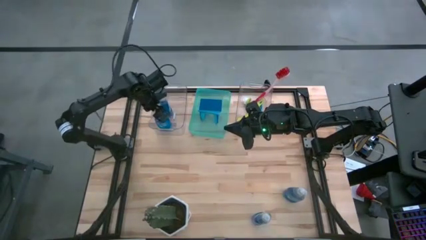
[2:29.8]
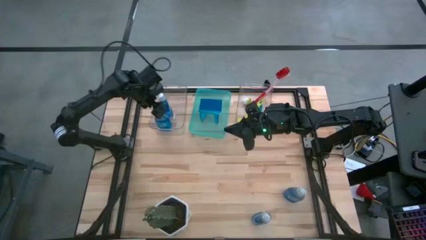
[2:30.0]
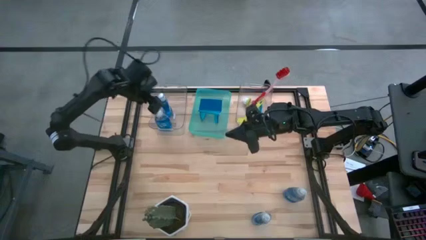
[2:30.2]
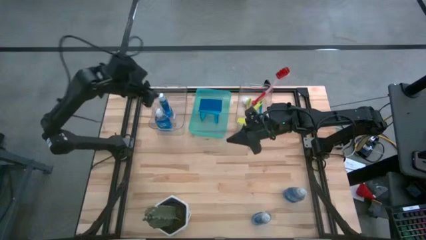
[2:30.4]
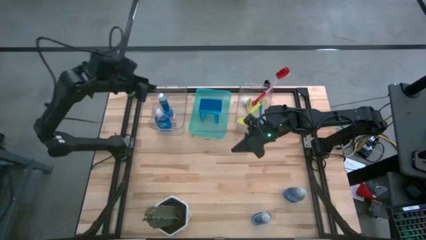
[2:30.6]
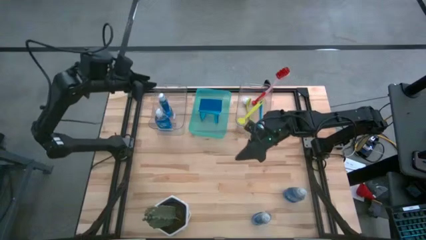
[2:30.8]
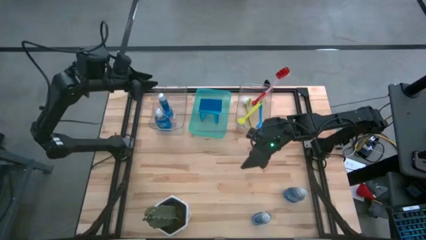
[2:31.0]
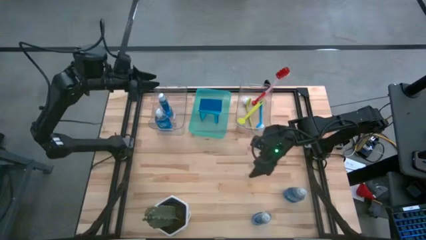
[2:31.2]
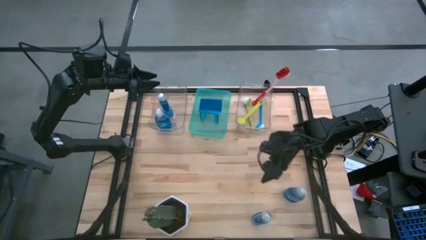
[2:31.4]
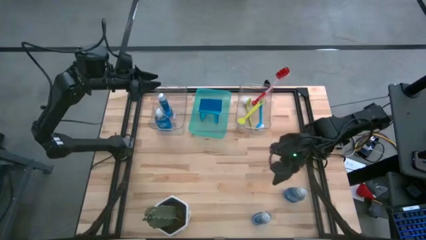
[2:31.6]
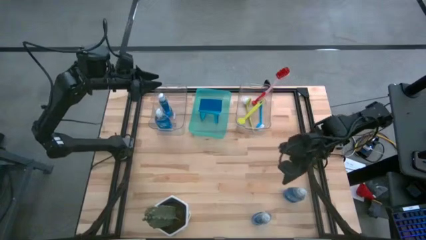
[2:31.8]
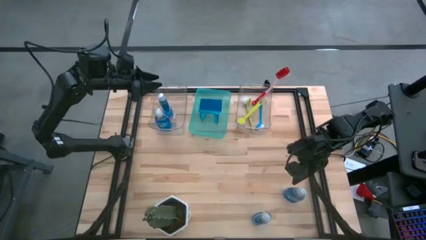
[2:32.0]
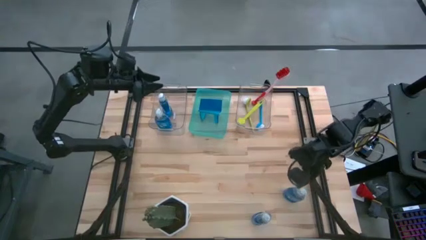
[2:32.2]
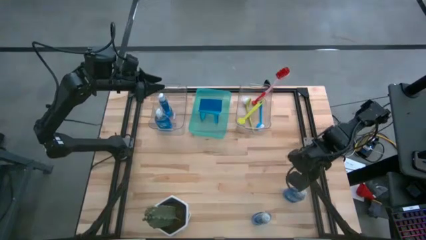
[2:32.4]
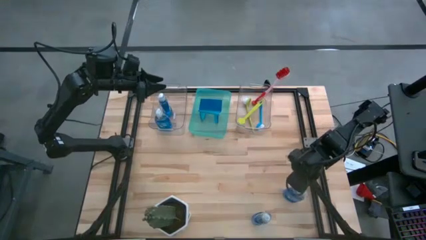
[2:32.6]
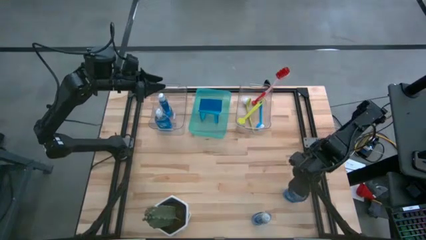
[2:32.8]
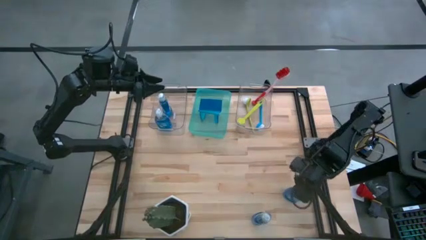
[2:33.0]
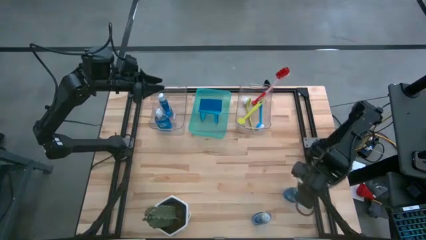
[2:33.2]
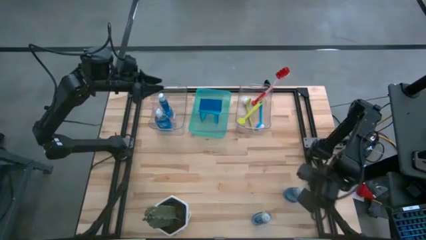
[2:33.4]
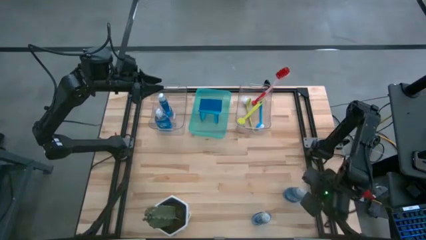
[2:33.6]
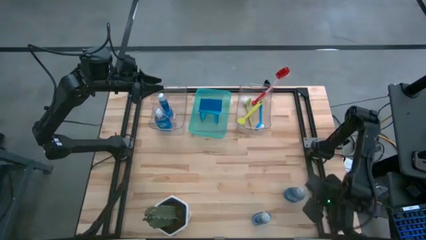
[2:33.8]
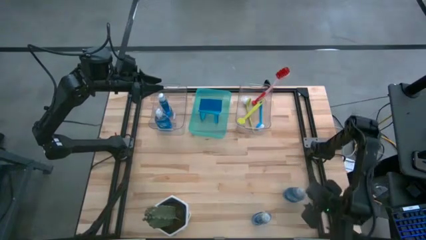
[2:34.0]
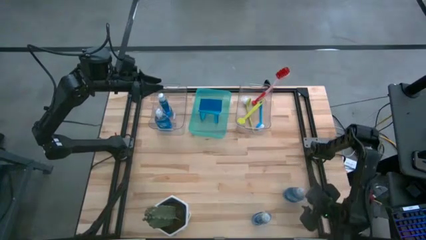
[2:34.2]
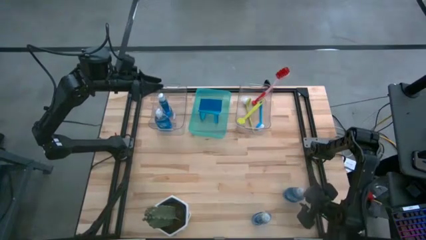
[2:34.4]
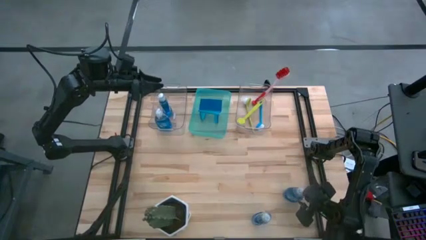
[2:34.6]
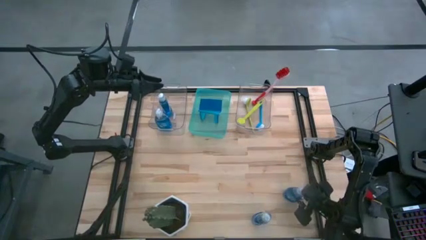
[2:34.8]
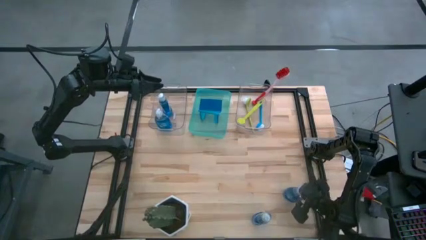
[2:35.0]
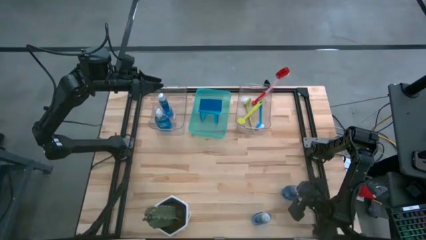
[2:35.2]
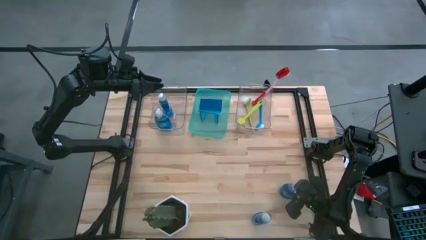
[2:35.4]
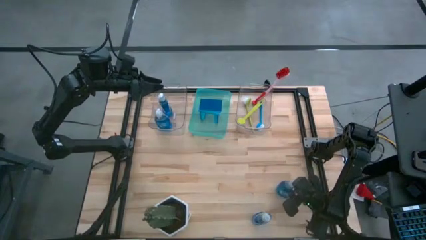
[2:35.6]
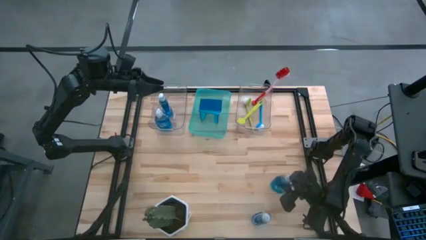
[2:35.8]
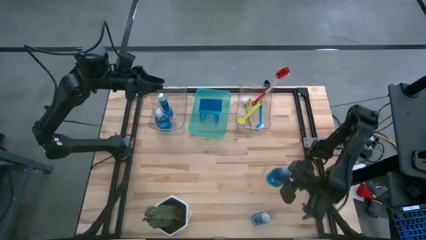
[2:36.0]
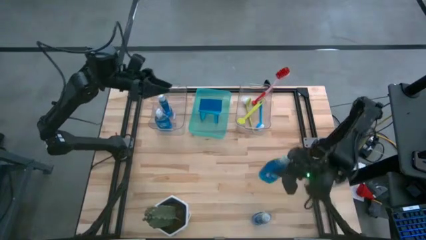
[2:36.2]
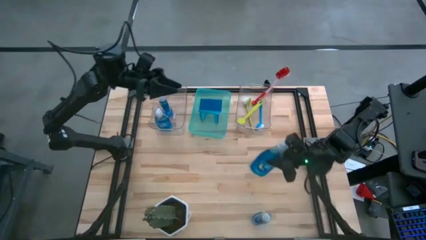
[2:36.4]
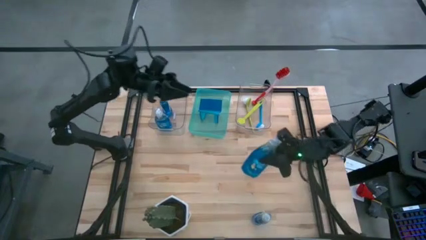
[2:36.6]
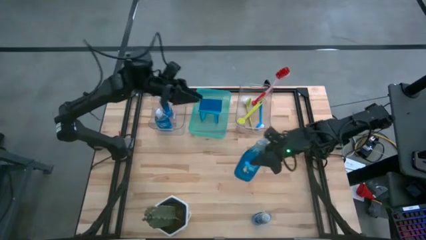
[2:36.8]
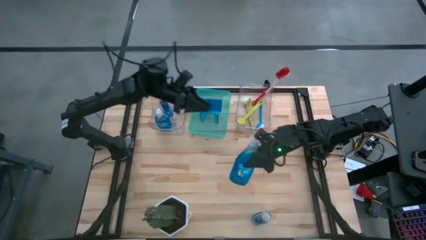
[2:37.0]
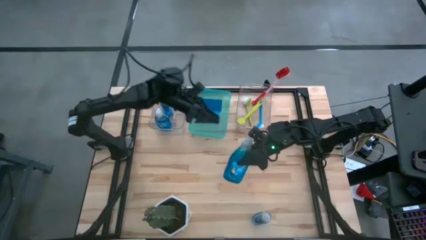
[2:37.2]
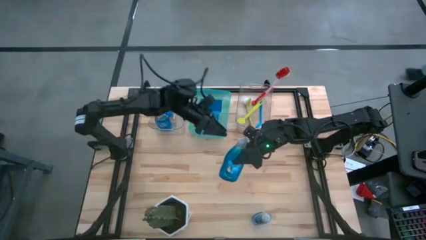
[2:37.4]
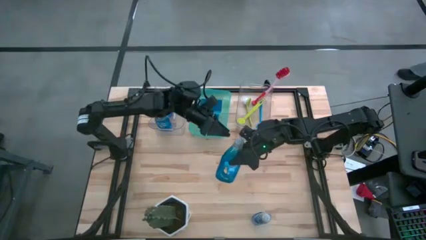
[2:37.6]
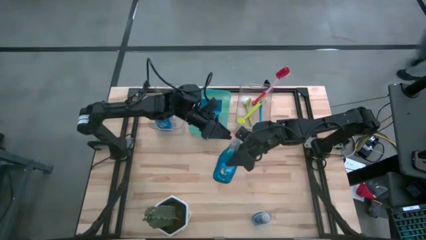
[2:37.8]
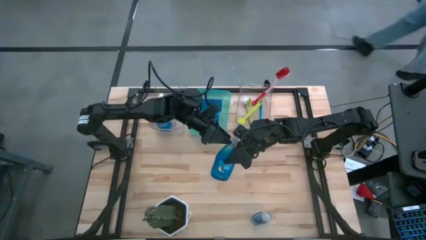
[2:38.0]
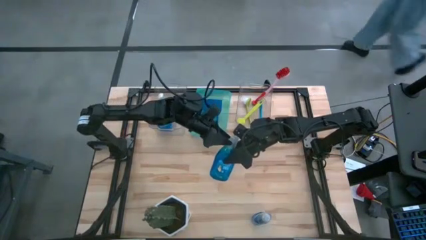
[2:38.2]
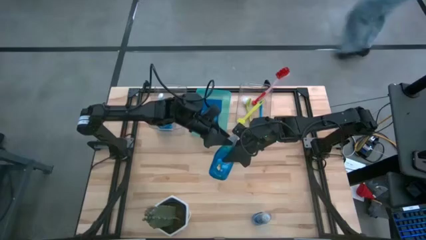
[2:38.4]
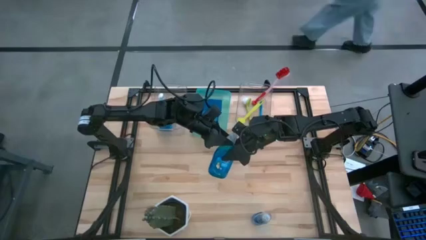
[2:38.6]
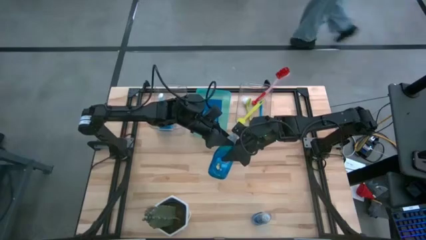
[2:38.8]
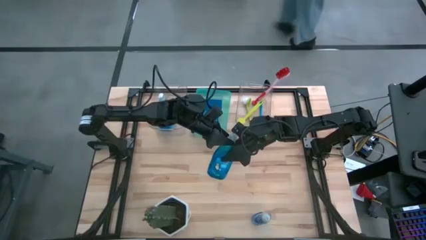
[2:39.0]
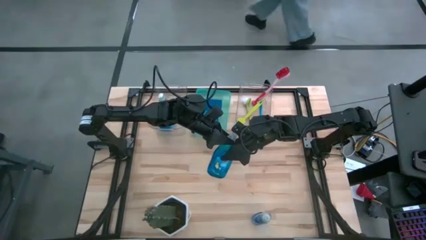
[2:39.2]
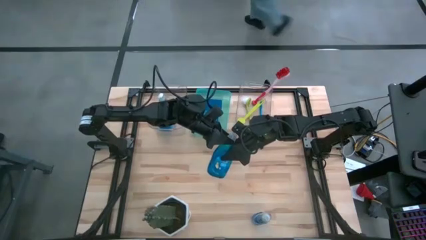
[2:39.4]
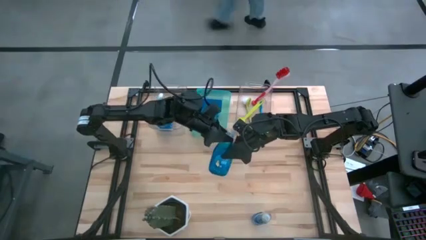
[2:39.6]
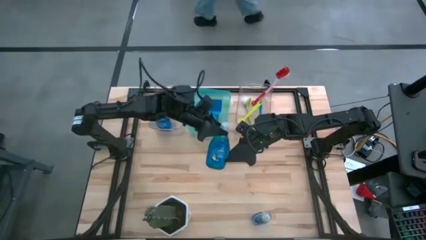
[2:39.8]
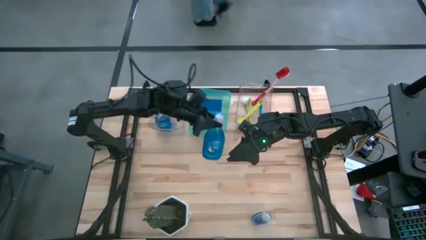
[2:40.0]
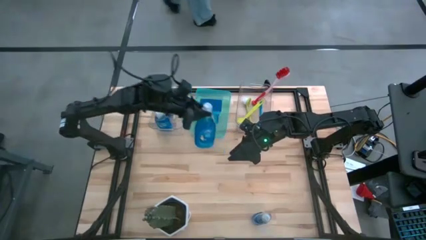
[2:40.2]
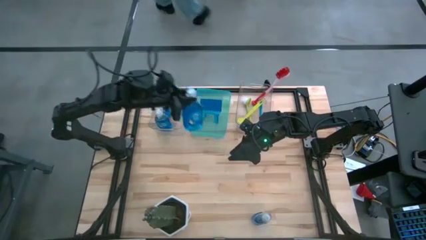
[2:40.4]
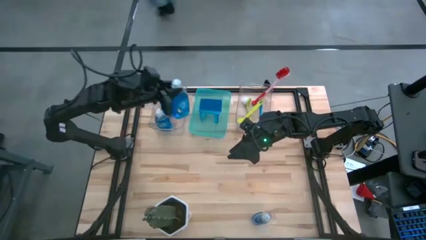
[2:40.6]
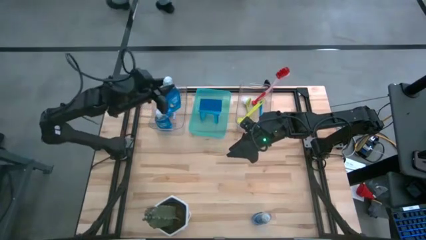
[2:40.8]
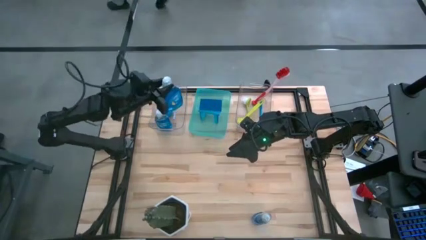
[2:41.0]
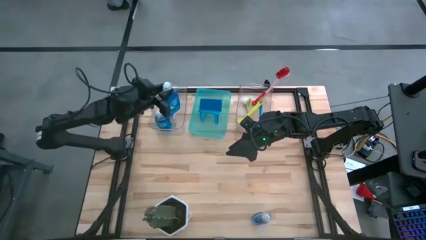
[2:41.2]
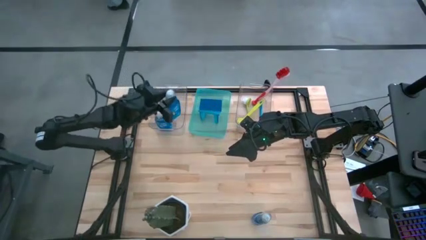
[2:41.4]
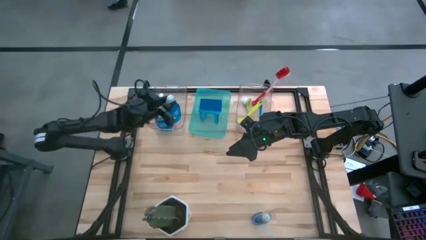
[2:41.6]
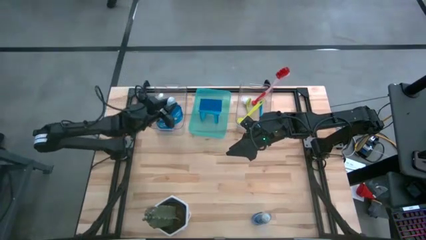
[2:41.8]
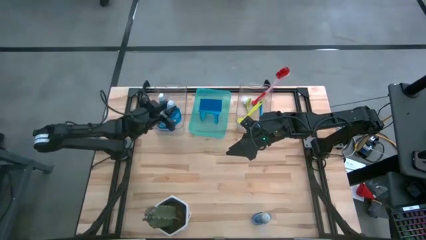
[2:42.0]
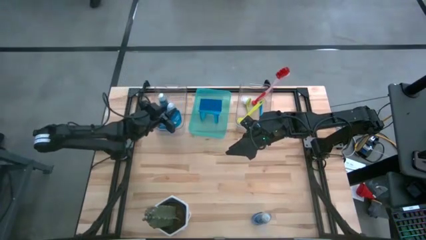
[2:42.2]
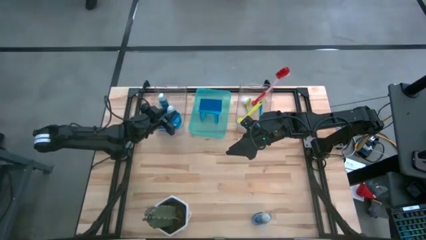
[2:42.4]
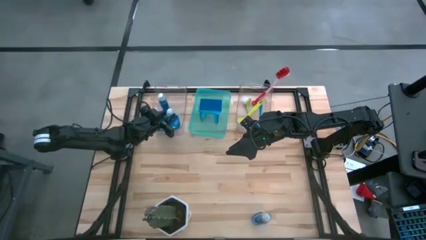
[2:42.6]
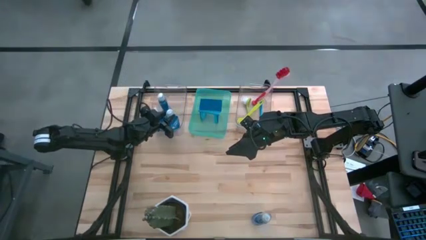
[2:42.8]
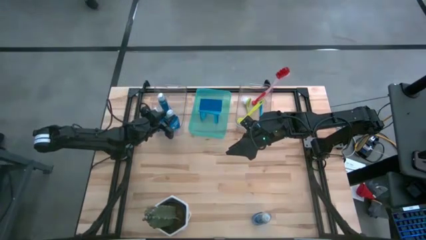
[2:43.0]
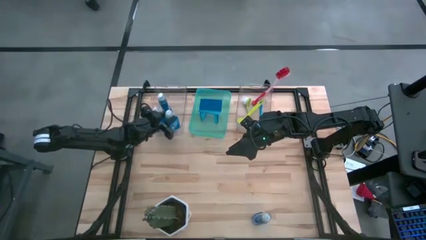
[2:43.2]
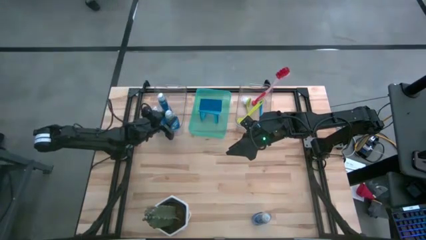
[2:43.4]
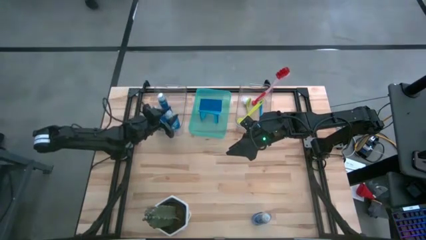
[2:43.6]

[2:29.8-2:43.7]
Task: Pick & Place Kitchen Sink Supplies
Put the dishwashing liquid into the left transparent bin

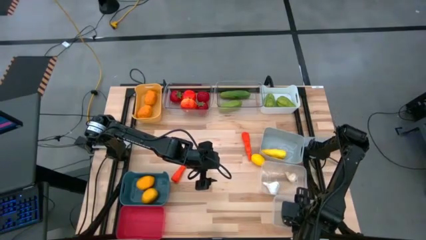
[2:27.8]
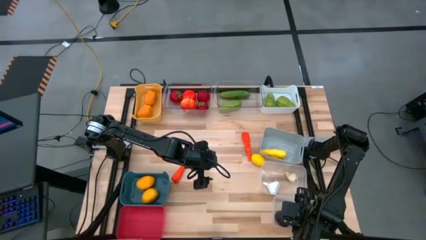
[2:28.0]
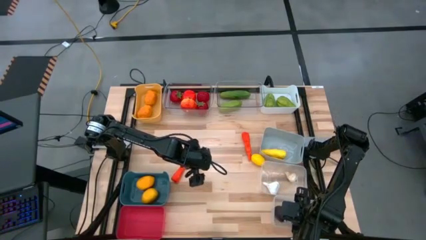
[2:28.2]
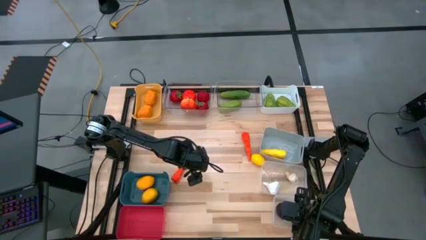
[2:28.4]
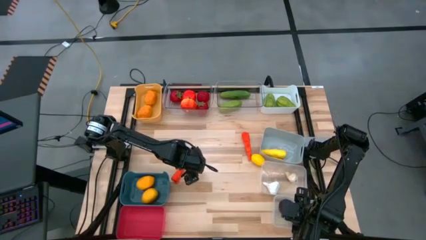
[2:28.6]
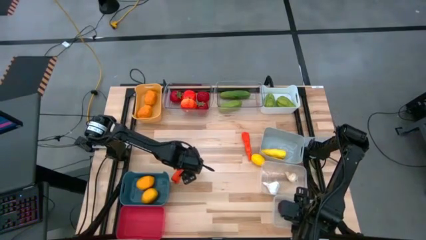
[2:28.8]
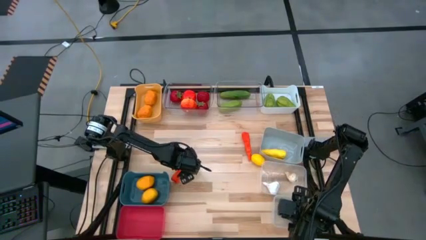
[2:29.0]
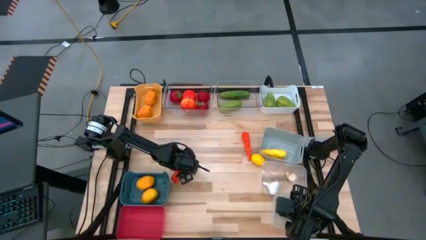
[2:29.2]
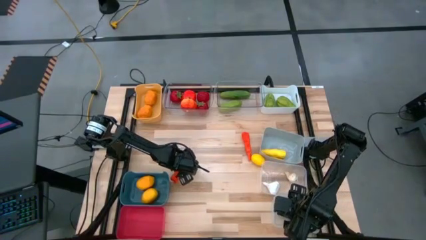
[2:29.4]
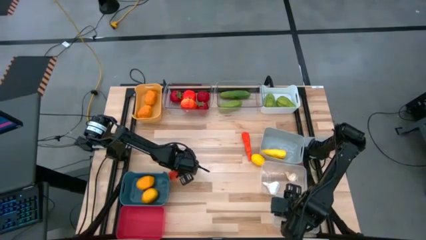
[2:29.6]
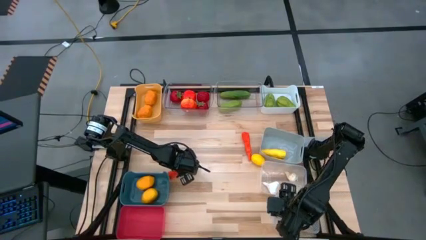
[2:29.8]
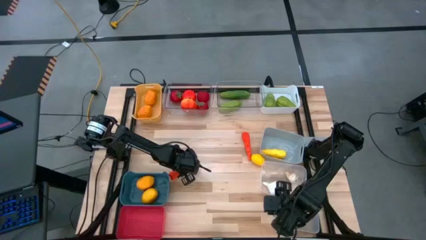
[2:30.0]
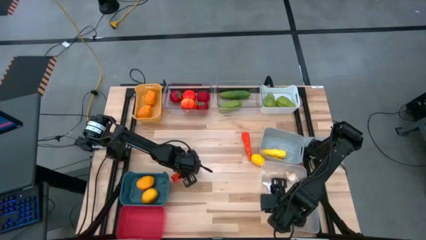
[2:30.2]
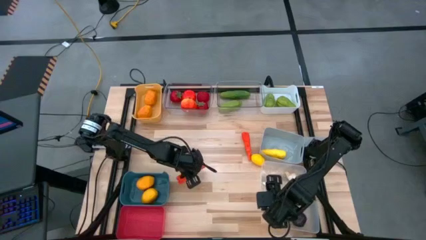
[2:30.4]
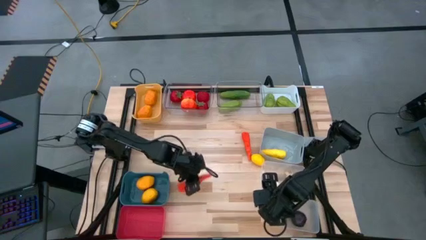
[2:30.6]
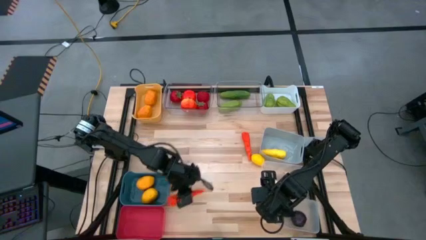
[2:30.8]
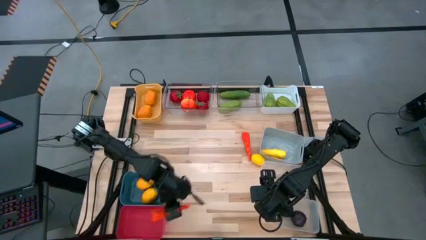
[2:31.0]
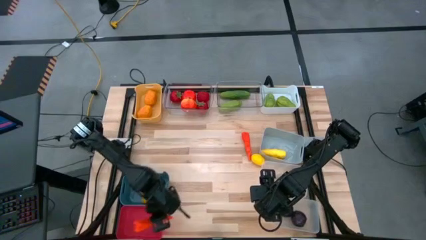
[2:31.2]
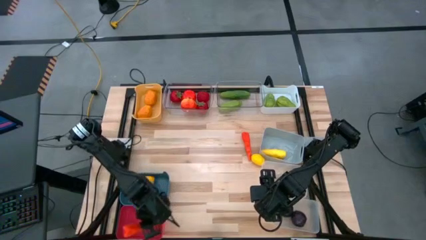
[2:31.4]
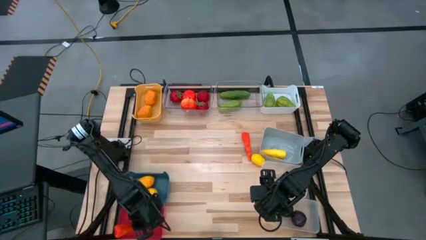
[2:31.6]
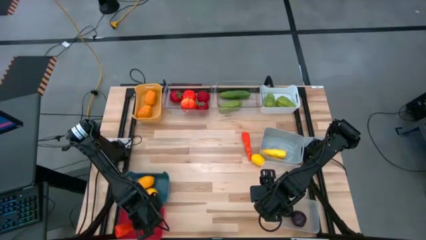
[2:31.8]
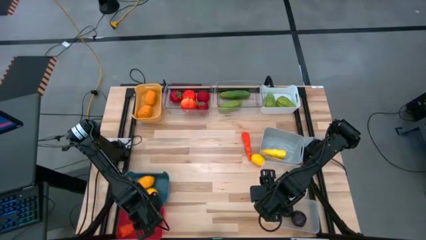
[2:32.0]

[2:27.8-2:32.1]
Task: Sort produce into baskets
Put the orange carrot into the red bin
